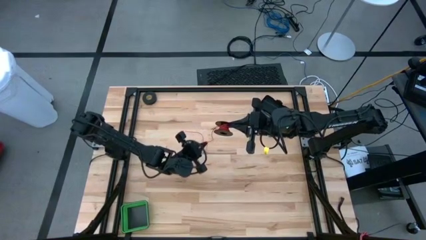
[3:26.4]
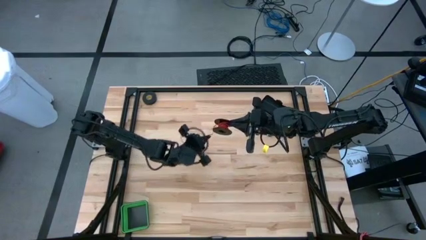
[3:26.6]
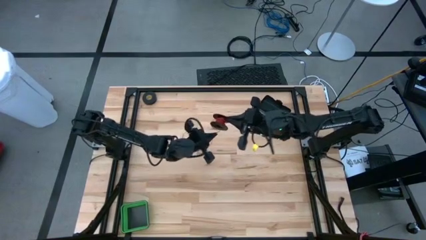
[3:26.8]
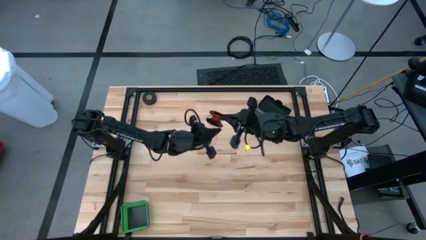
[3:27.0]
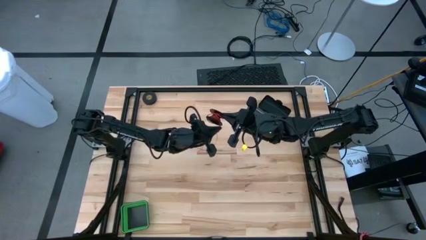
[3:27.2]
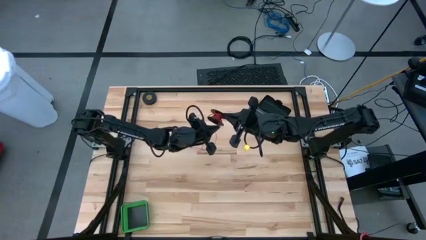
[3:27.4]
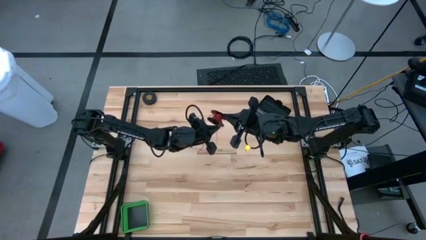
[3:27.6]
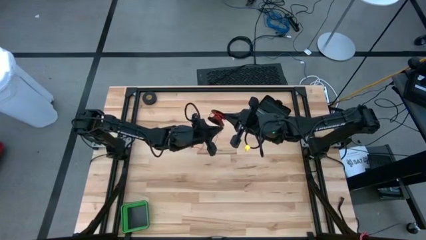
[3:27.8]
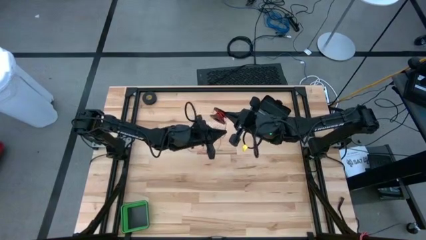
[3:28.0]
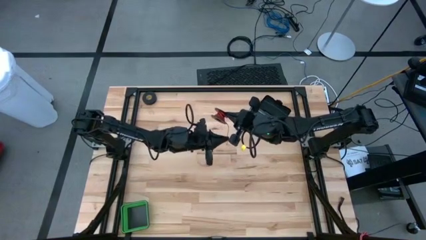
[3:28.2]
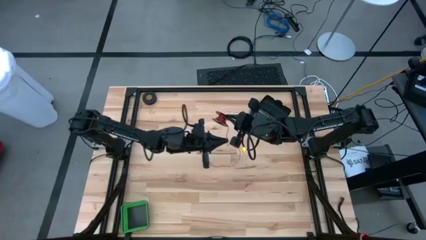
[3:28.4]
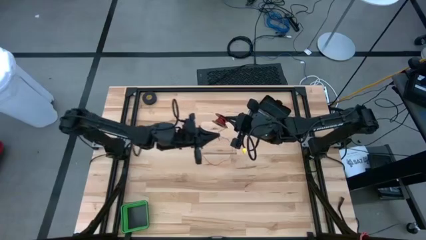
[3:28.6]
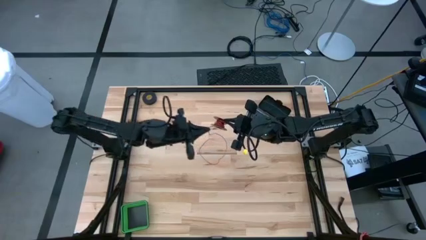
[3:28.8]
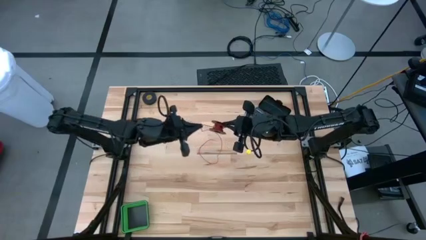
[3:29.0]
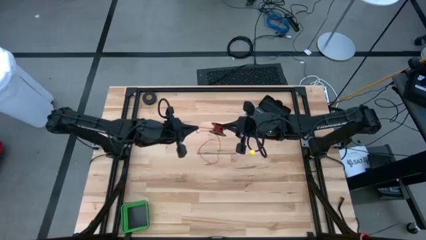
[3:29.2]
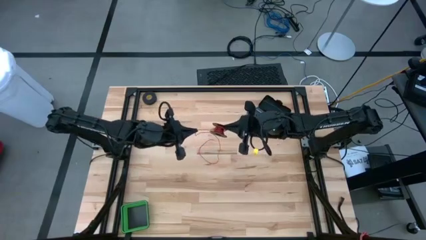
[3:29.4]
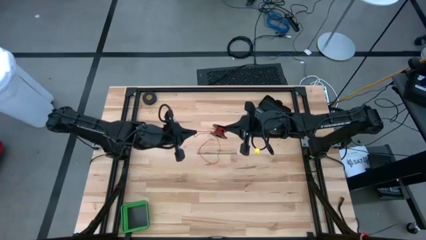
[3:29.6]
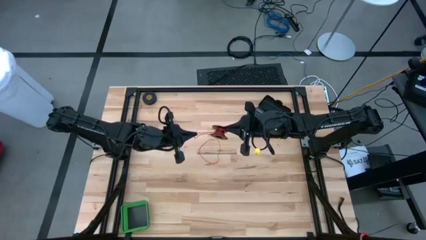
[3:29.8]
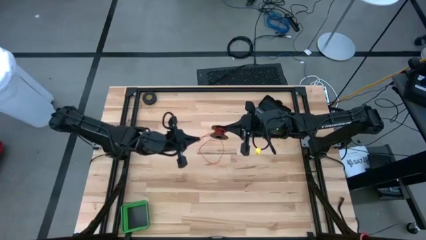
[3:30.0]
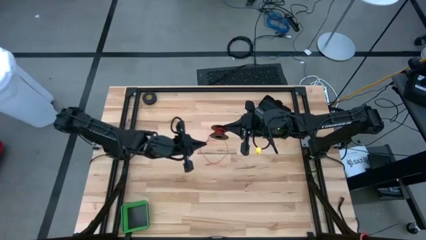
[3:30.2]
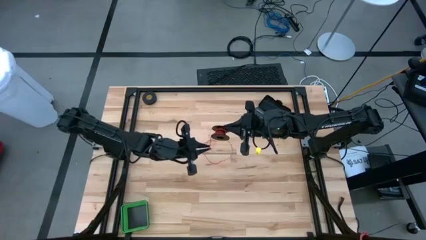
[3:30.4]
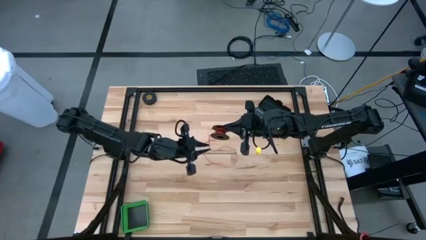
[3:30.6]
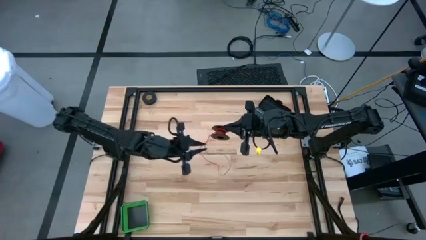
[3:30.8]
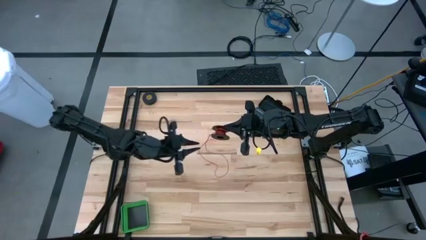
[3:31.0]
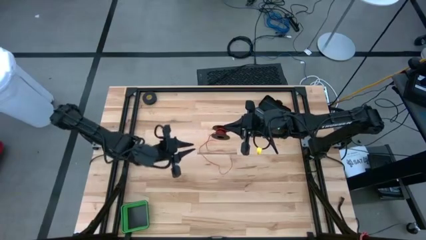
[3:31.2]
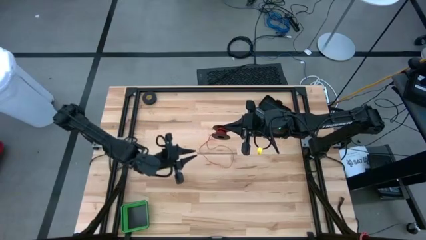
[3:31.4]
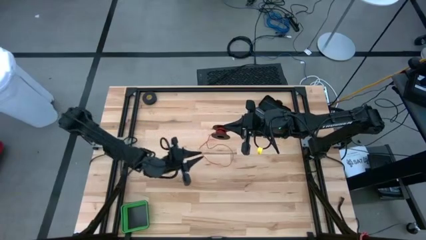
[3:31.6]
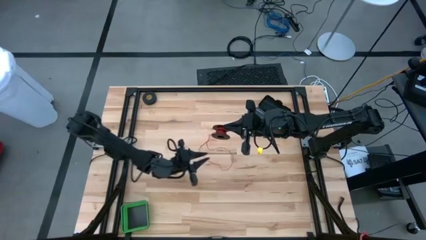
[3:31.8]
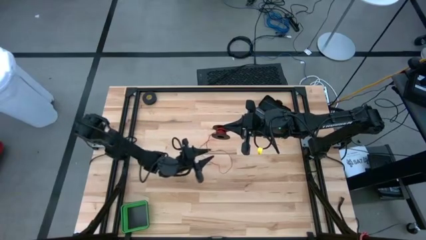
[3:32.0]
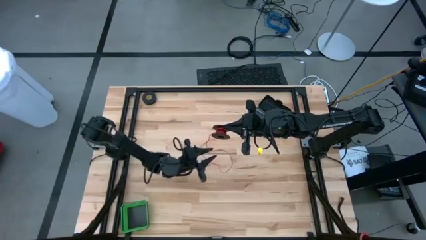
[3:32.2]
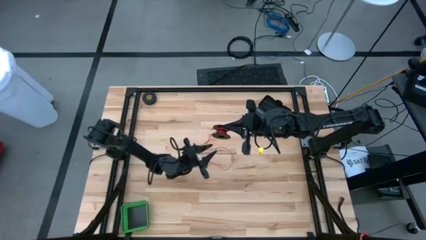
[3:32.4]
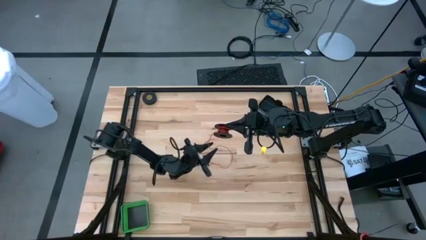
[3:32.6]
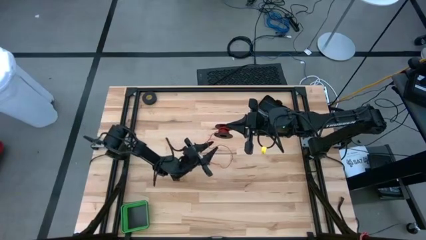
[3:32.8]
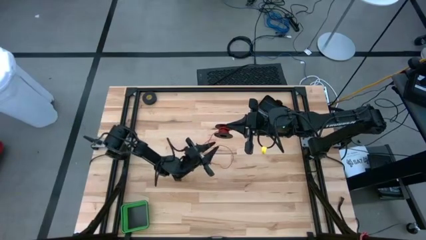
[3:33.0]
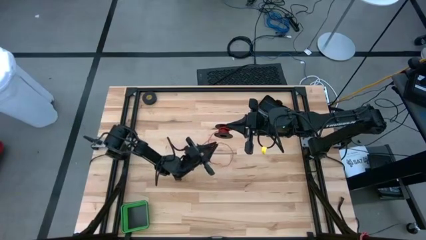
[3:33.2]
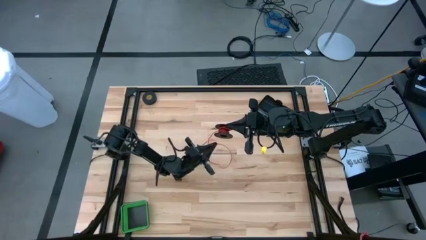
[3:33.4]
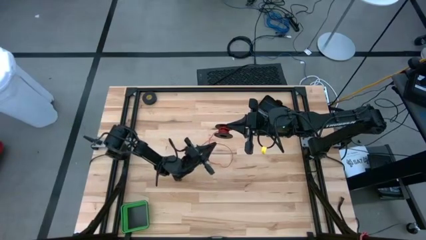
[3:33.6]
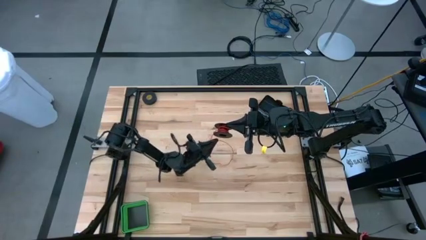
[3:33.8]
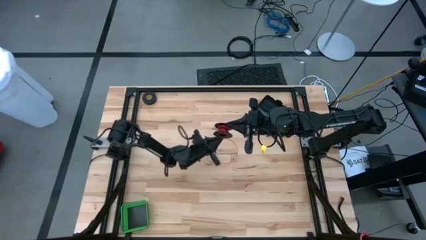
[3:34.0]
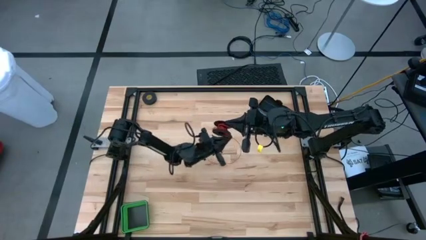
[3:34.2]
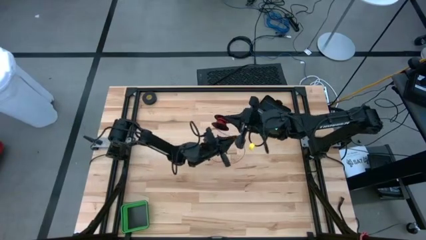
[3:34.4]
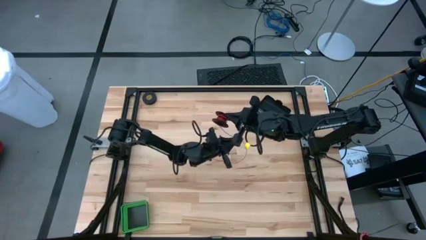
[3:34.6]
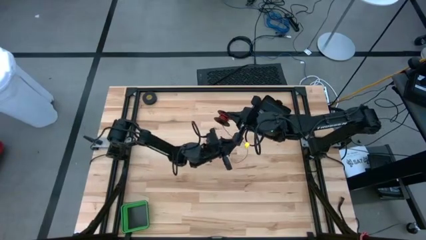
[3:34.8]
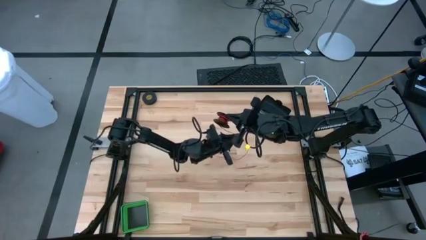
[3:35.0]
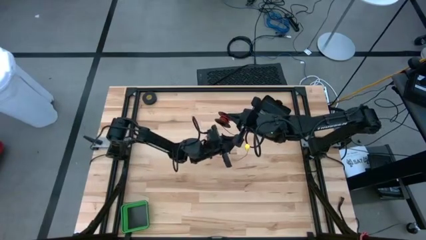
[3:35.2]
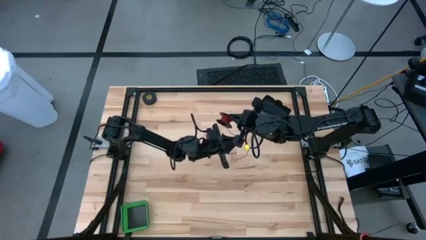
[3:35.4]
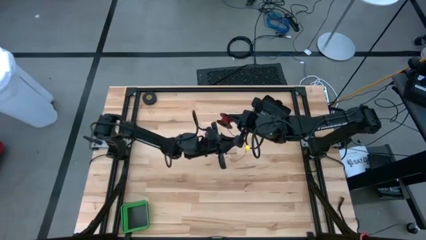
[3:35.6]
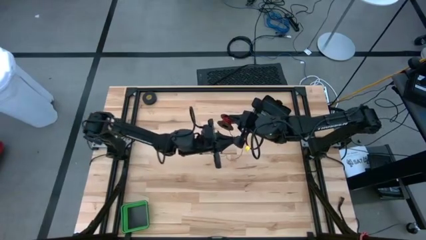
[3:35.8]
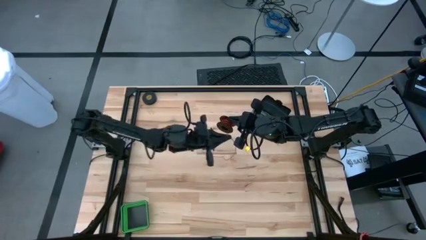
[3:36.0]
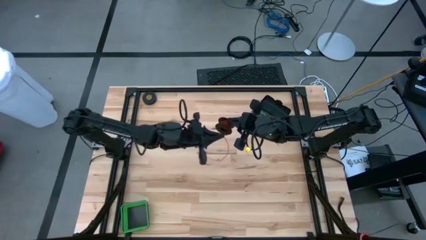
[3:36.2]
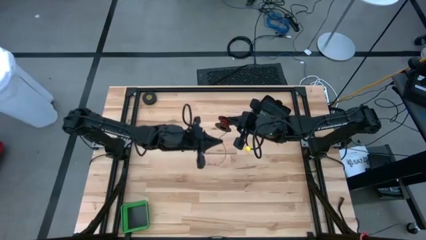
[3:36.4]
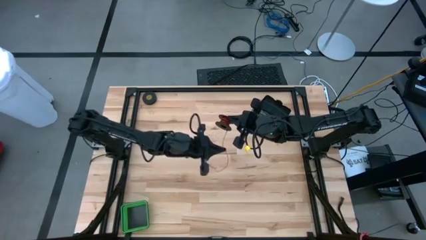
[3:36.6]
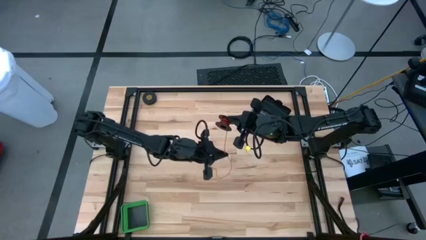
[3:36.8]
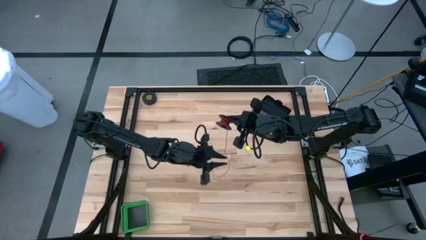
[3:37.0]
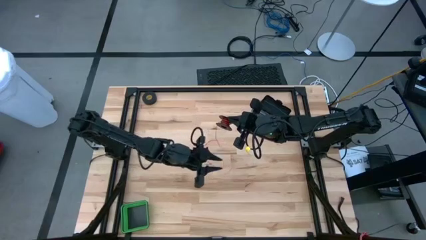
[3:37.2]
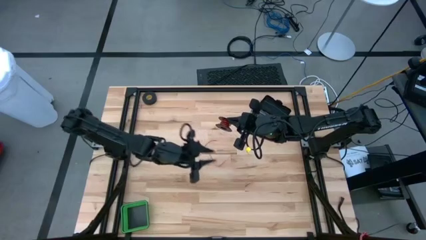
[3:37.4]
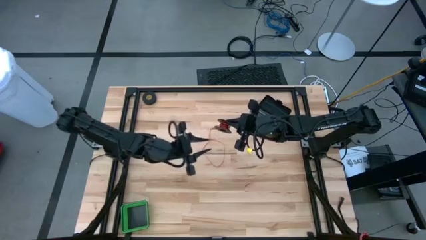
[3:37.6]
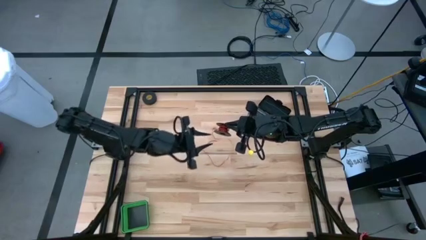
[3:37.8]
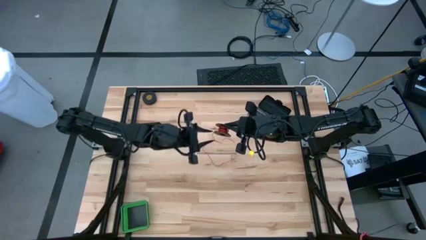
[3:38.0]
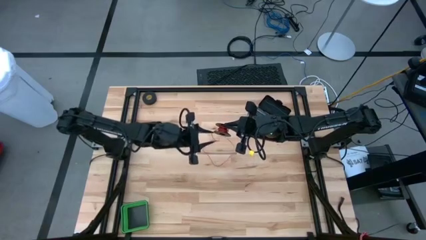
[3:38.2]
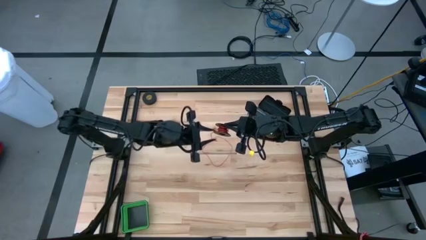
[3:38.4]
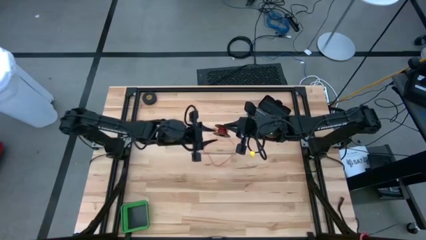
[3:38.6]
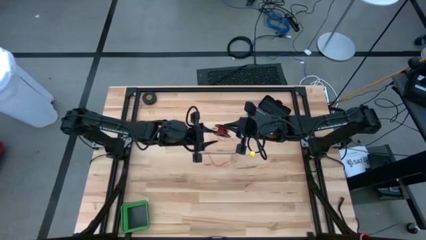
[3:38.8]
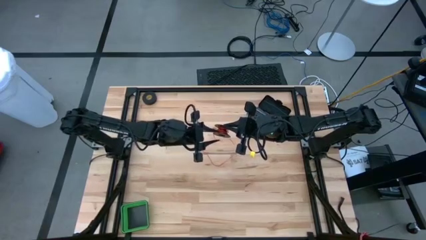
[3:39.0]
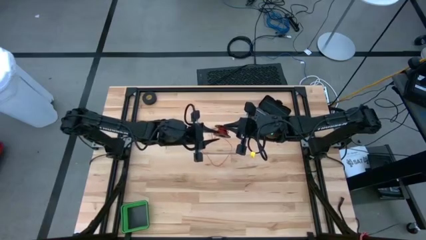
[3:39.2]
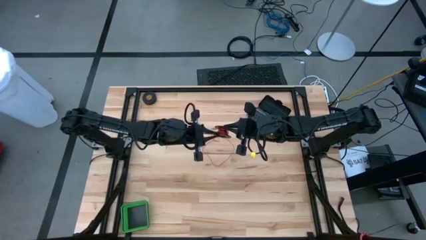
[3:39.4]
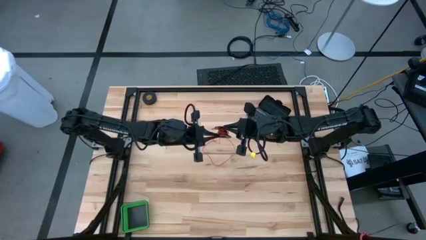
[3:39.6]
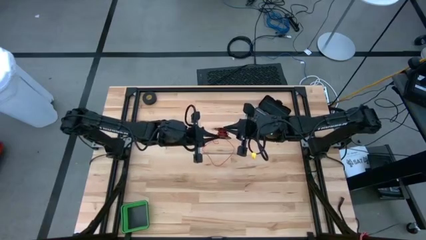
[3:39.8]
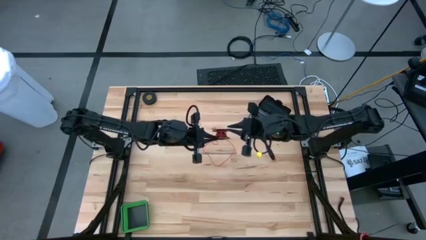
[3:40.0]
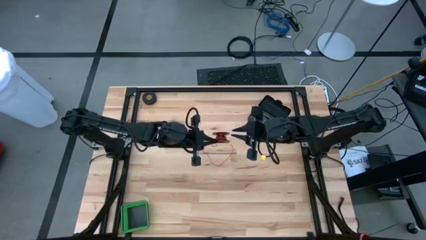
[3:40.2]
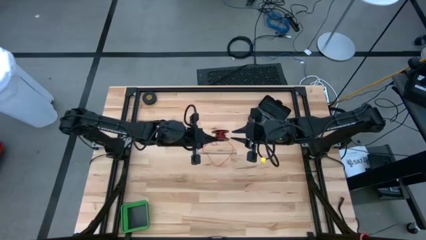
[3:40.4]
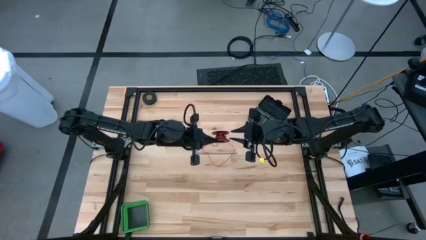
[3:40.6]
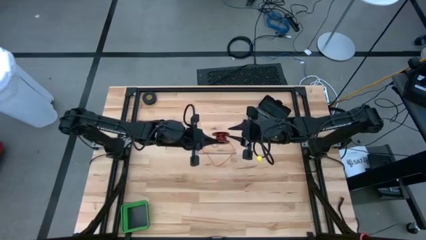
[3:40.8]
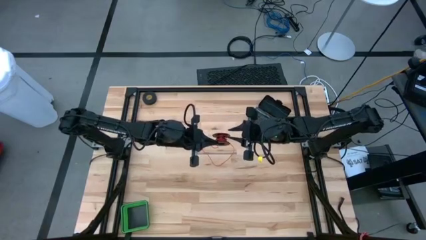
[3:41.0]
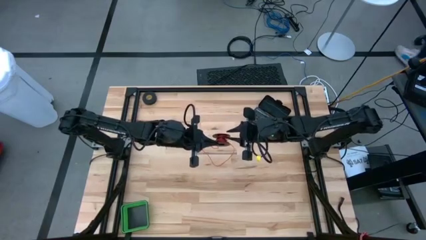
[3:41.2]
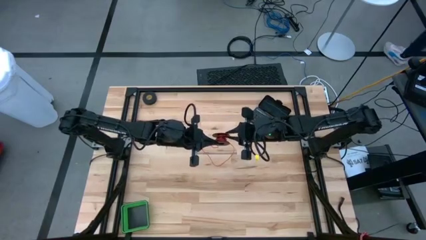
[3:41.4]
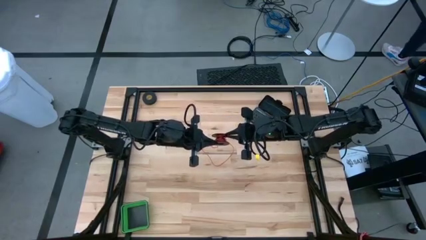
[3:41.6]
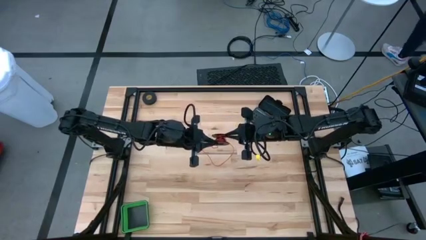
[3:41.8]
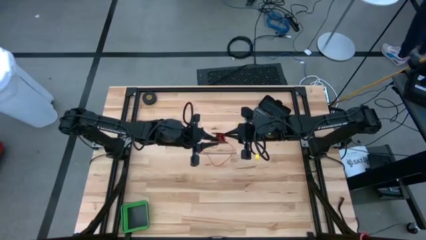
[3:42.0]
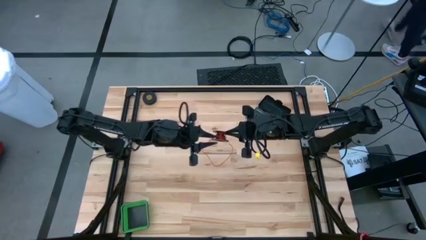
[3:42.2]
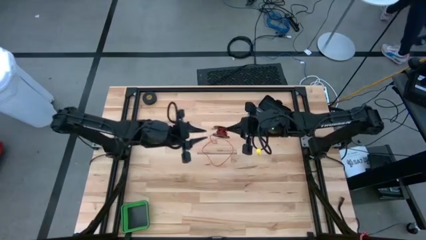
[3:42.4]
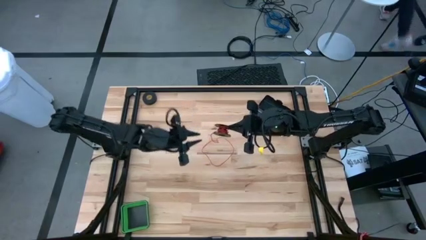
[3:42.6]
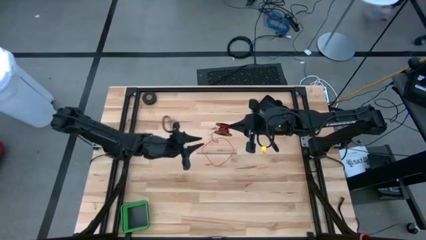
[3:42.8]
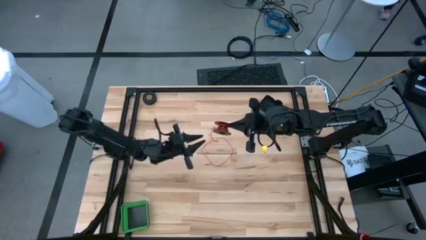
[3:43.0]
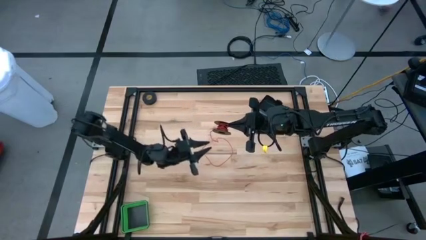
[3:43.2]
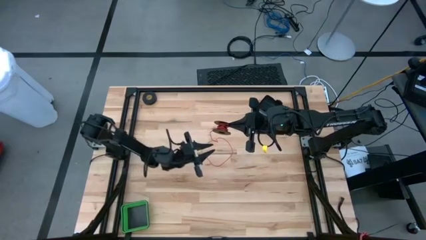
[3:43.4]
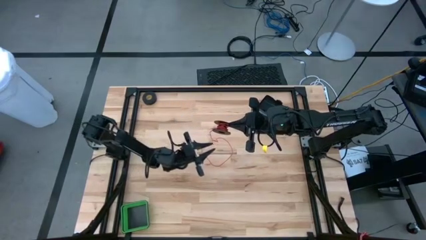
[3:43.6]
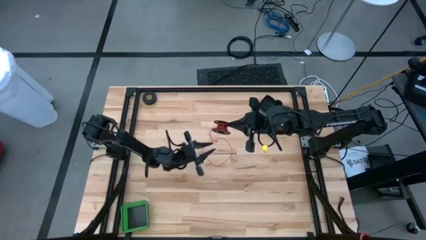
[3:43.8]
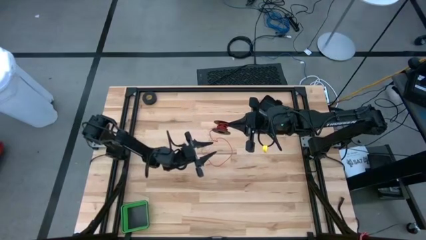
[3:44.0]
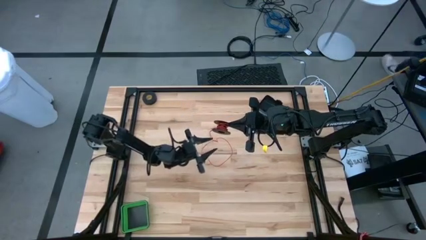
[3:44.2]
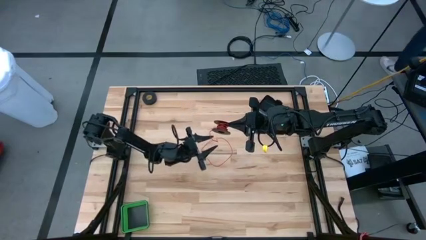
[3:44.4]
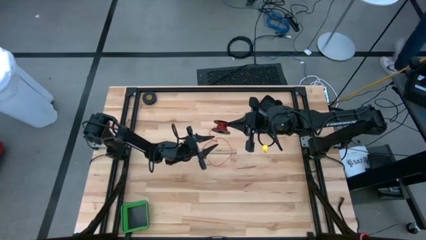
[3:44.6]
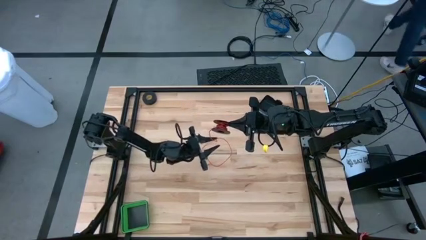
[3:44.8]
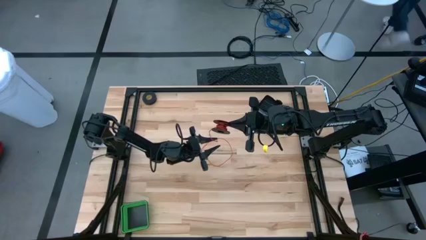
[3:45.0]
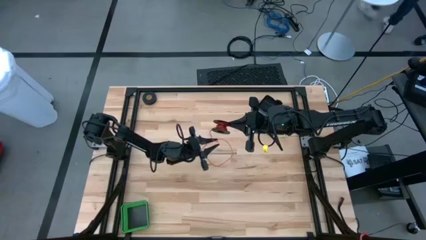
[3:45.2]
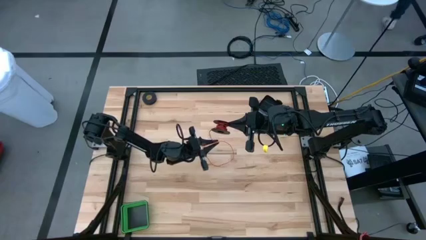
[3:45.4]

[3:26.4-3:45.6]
Task: Coil cords
Coil the red wire into the spool
